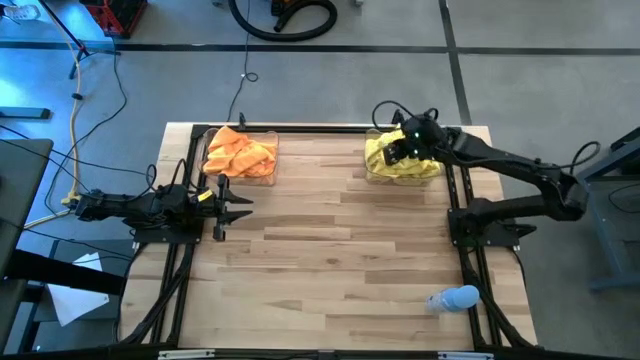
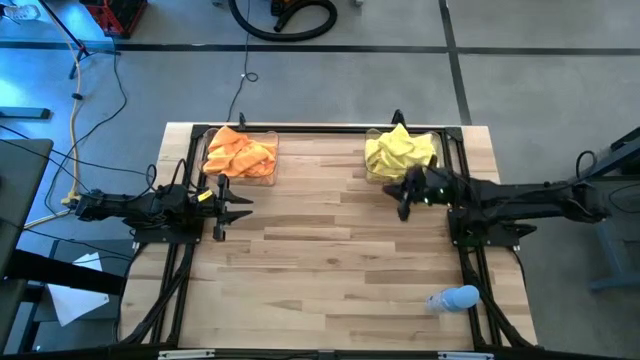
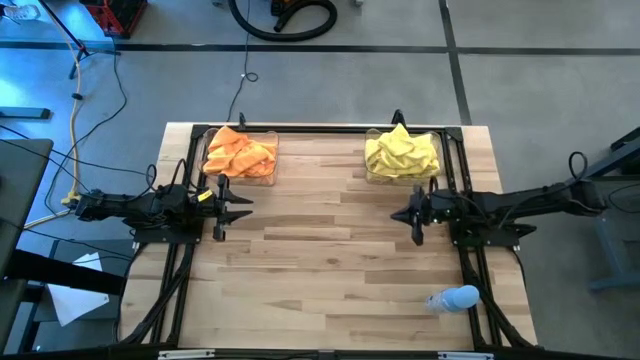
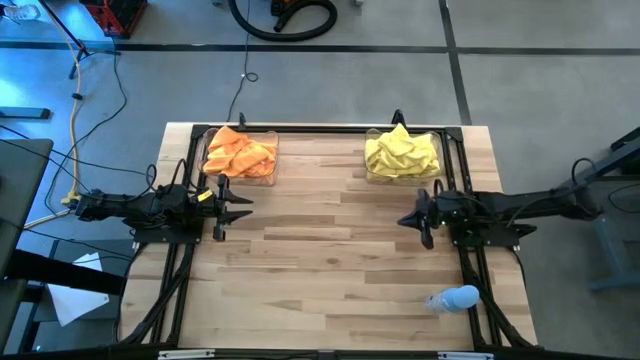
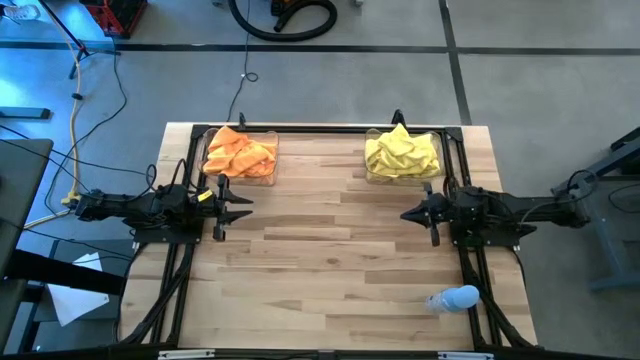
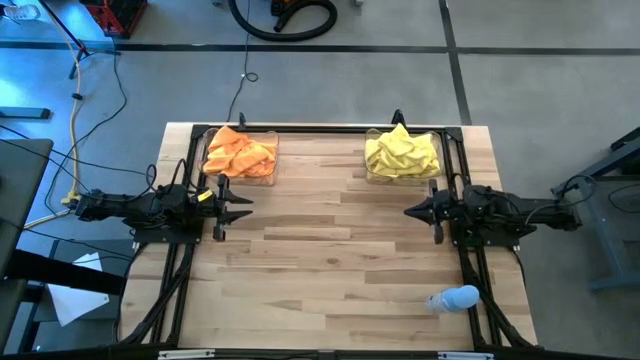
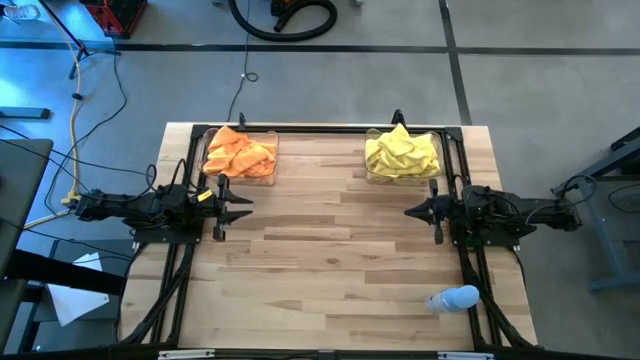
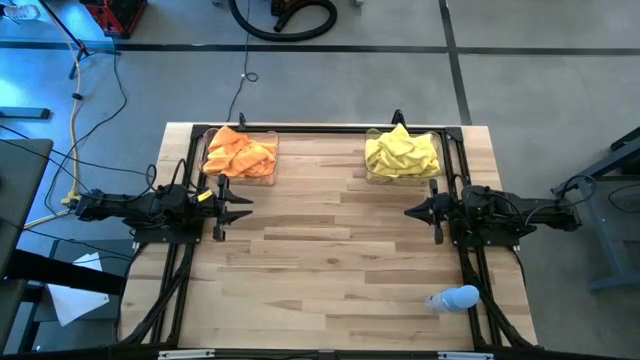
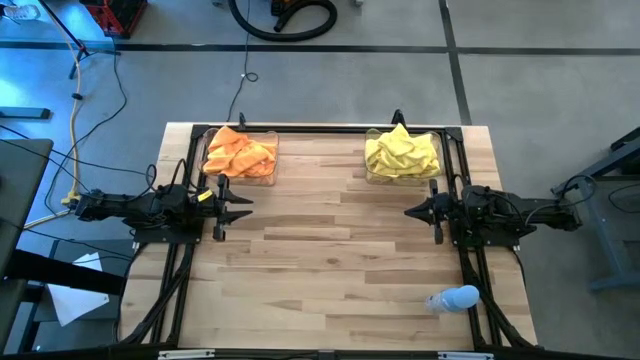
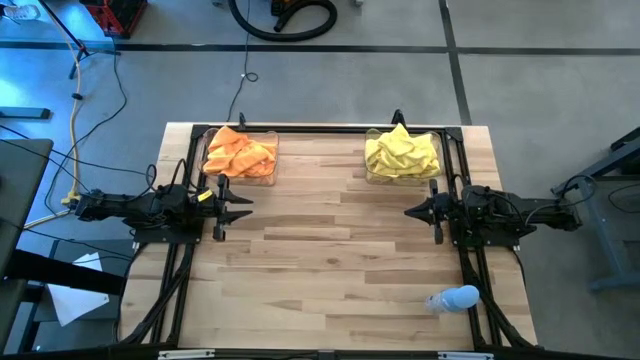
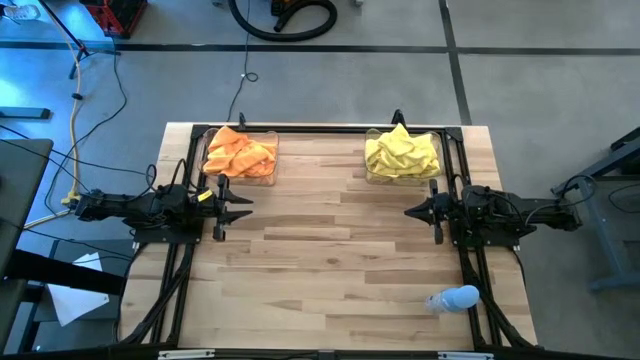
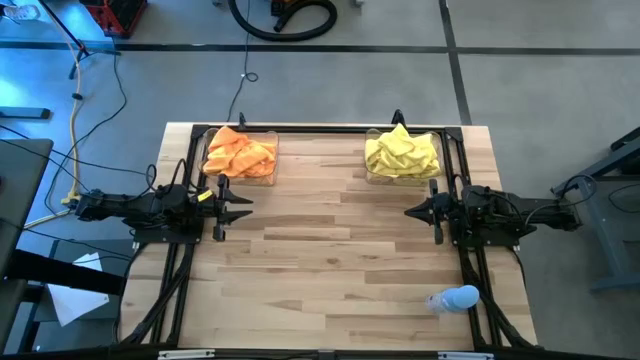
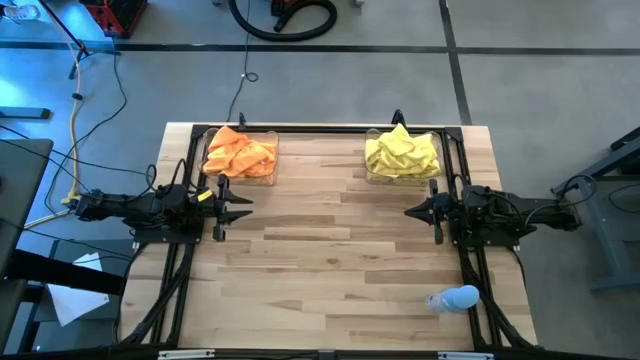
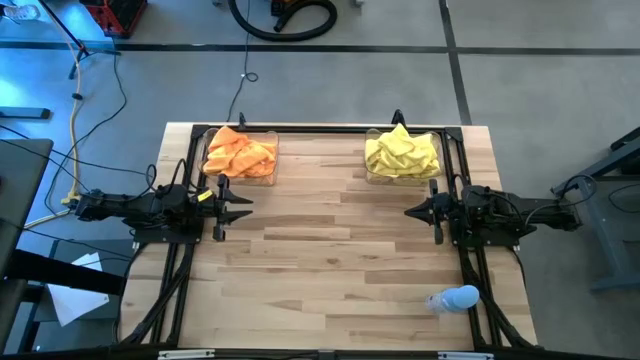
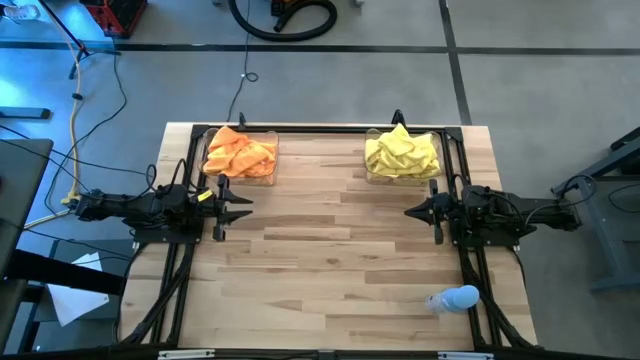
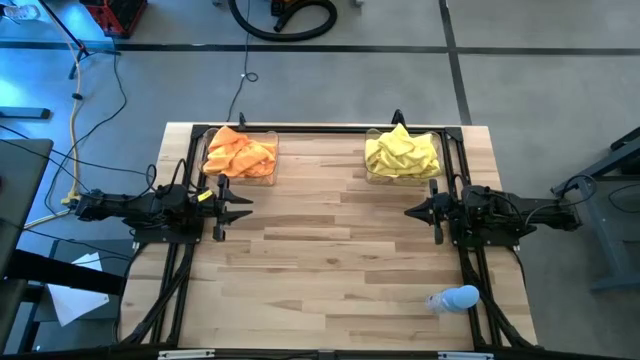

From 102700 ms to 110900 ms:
Task: Sort microfiber towel by color & place in baskets
Return to Home Position

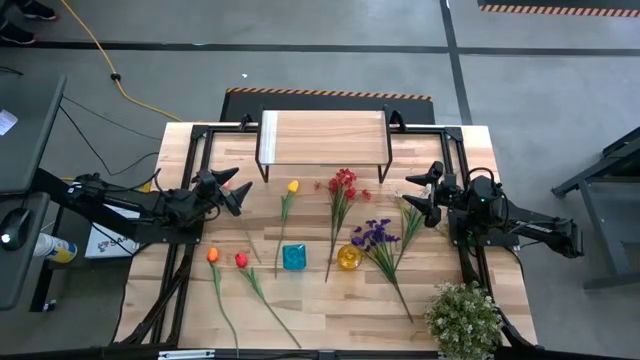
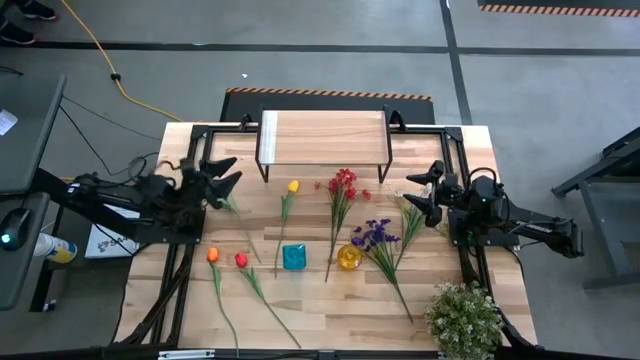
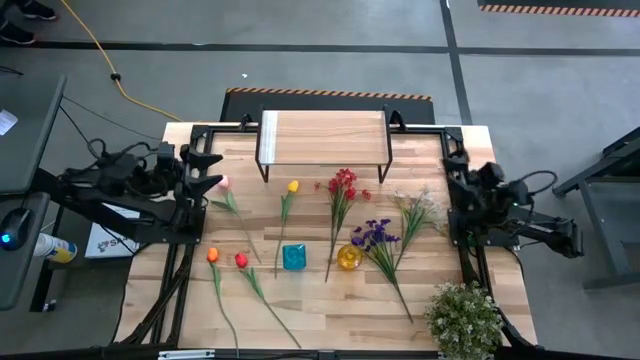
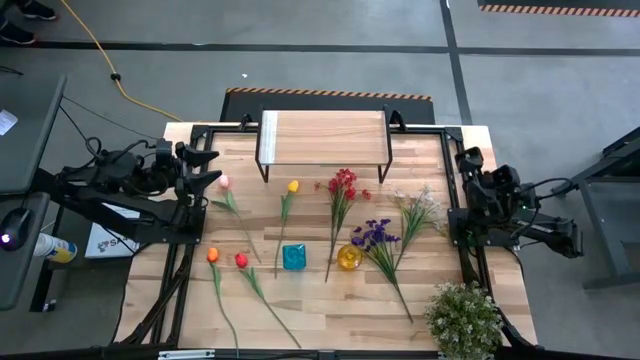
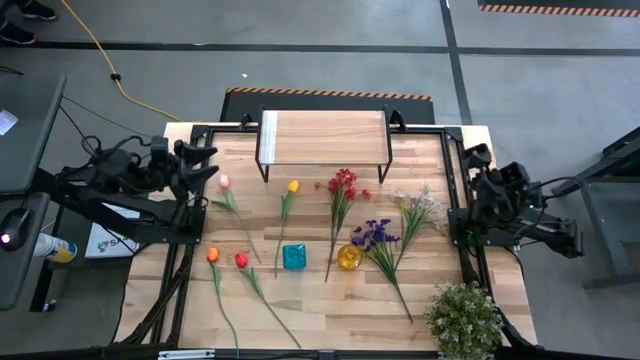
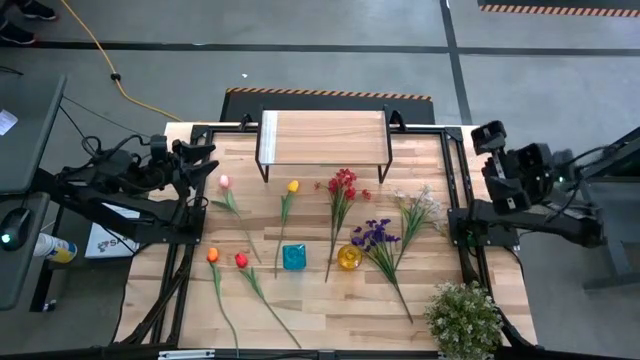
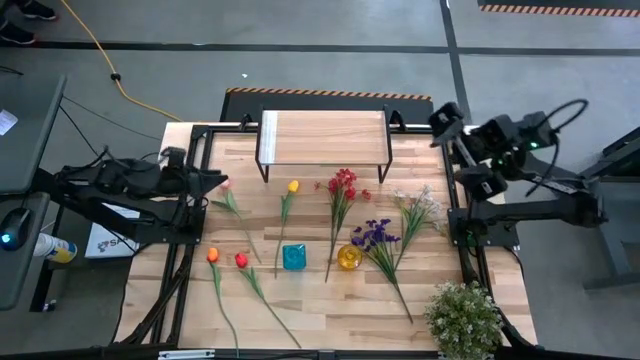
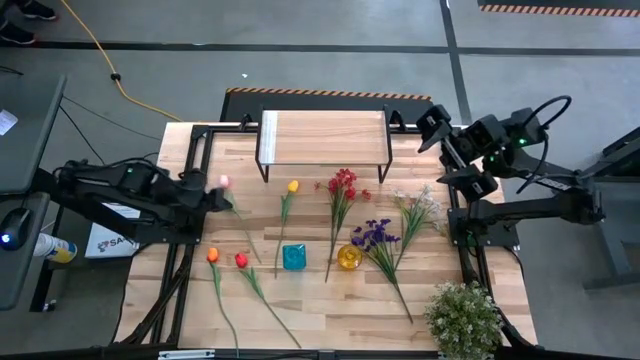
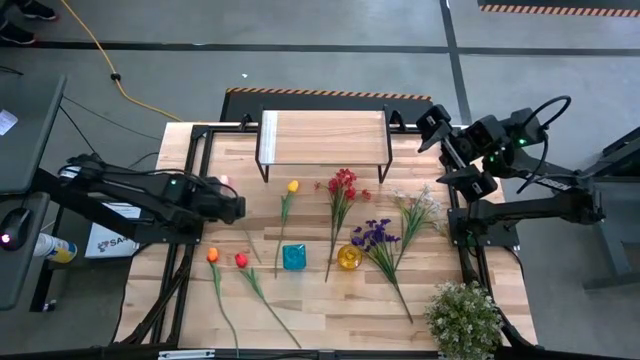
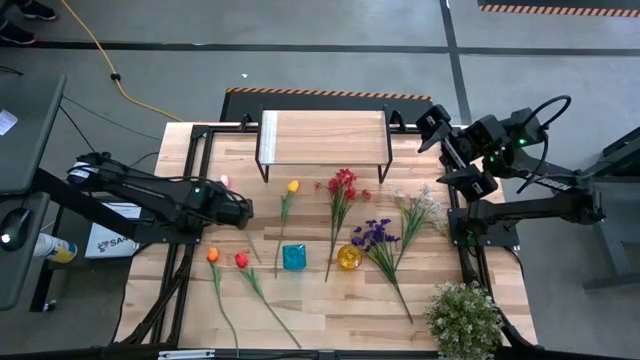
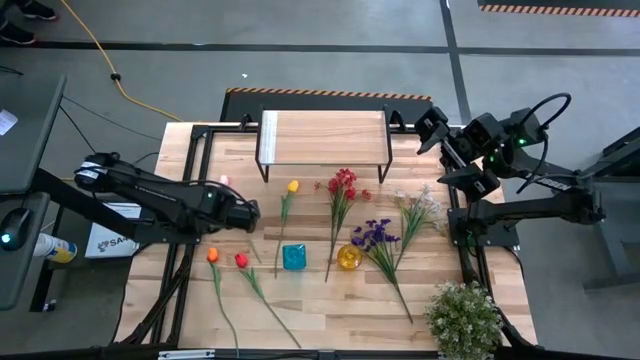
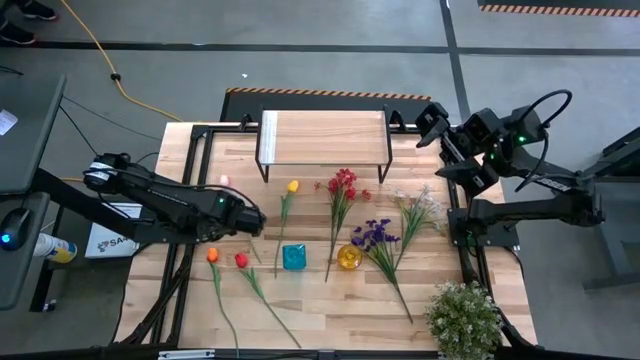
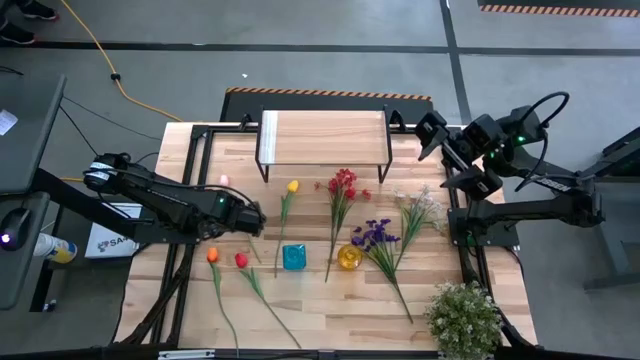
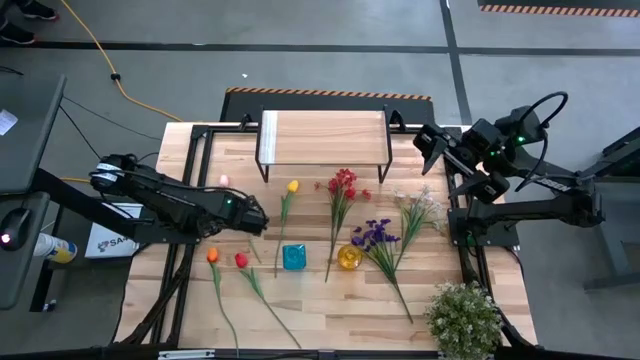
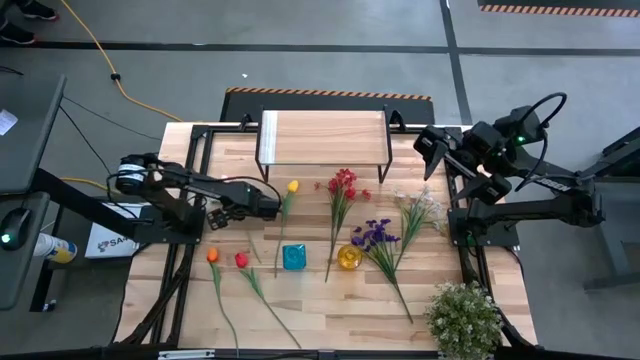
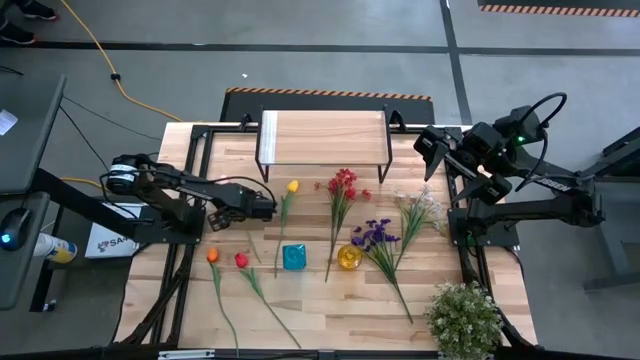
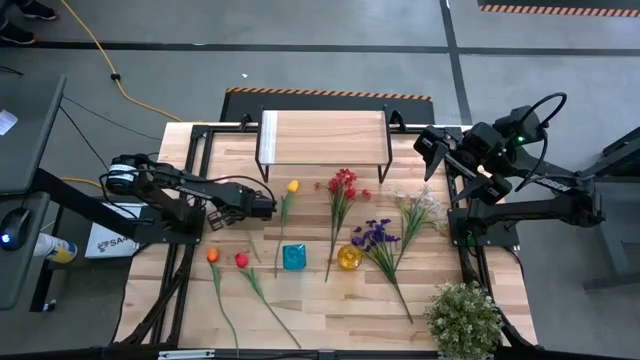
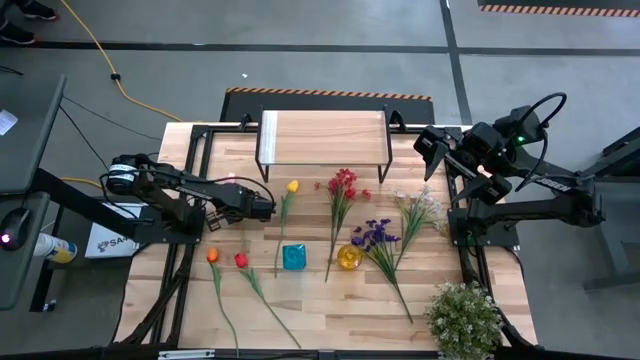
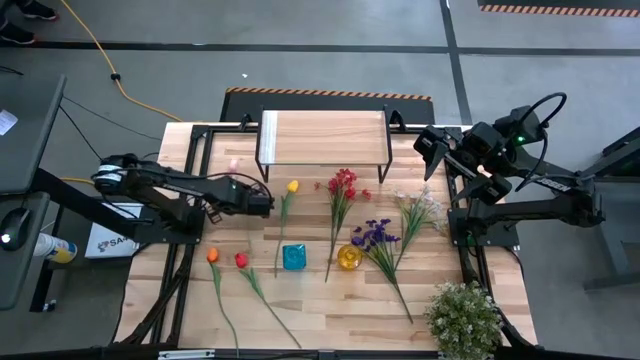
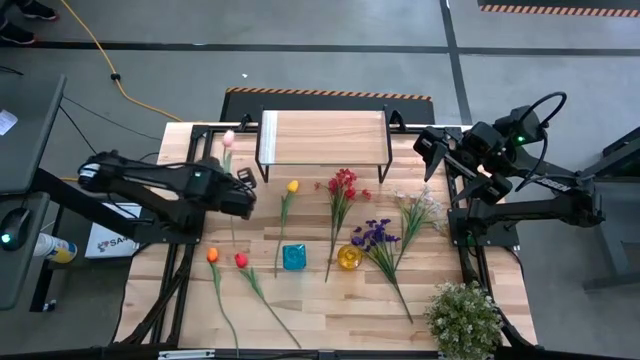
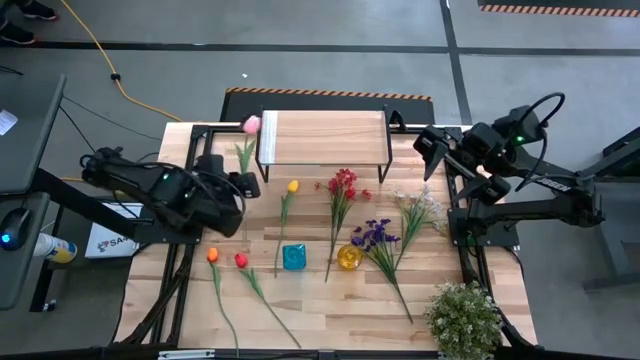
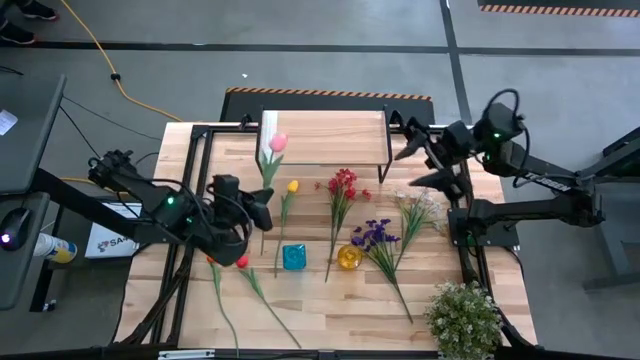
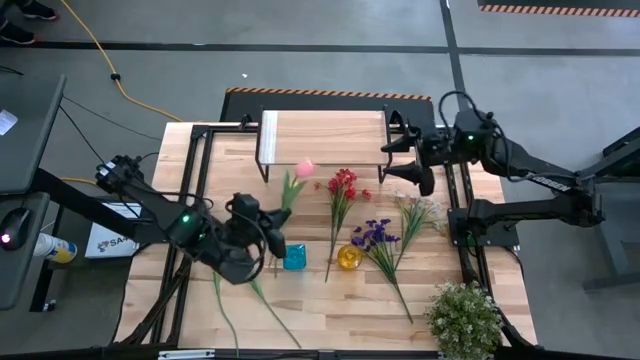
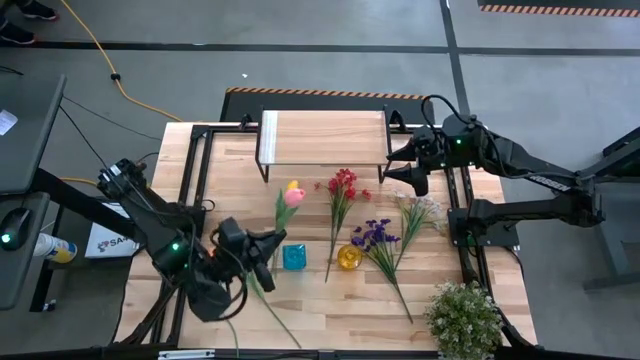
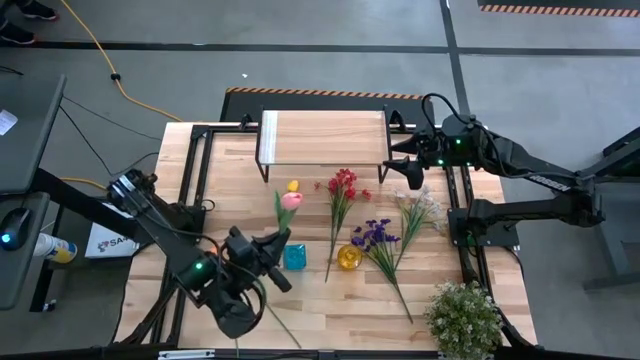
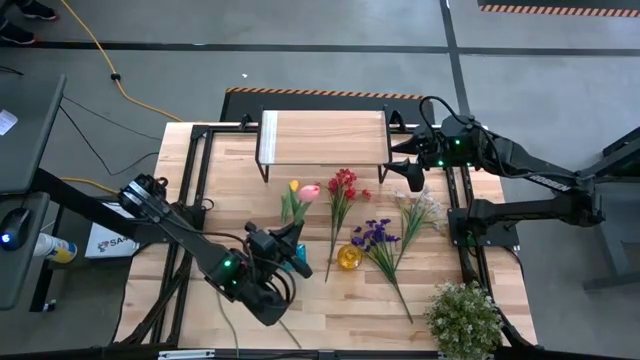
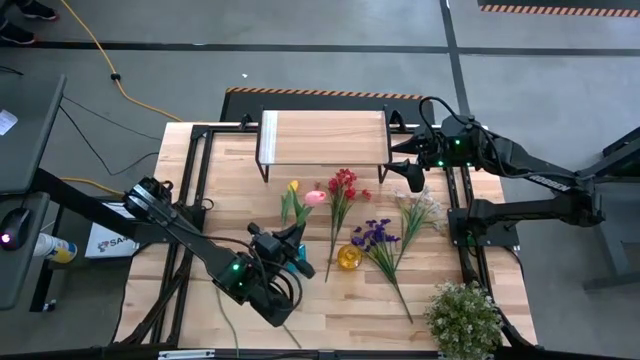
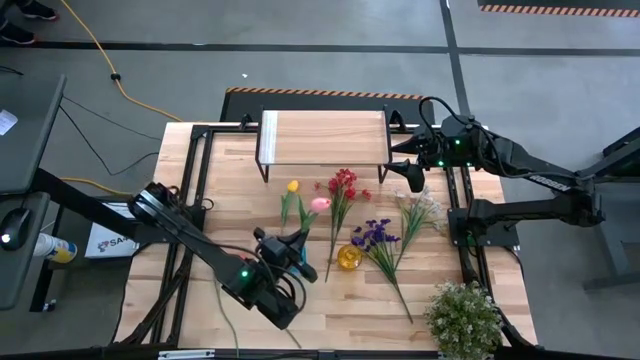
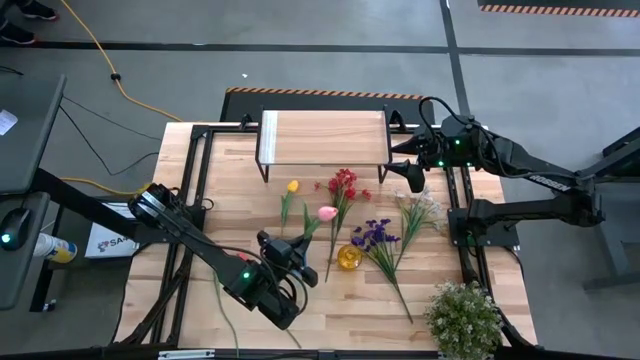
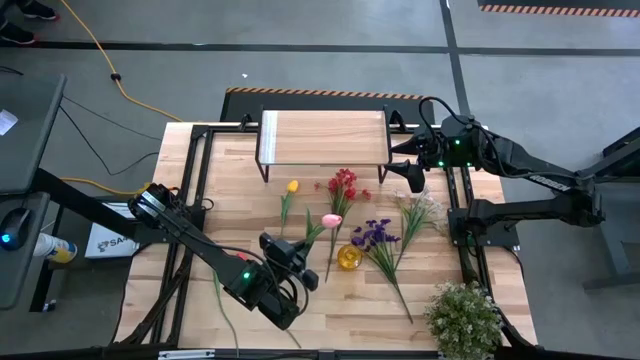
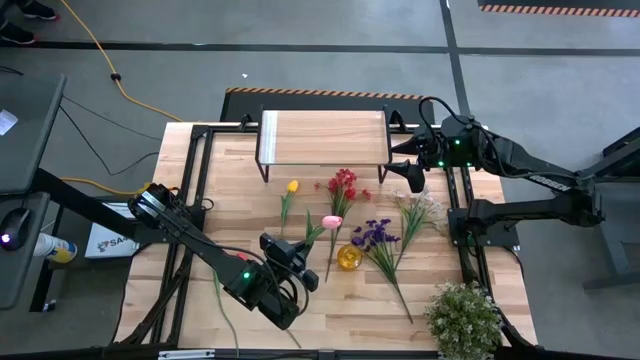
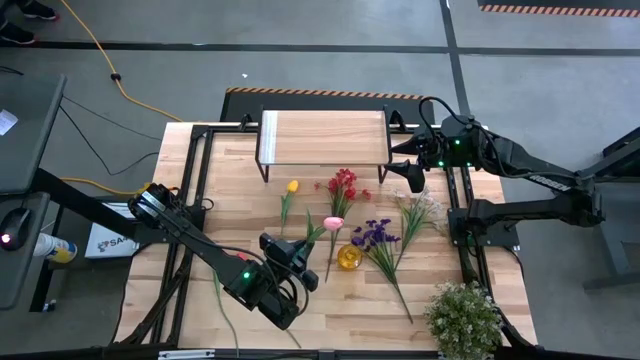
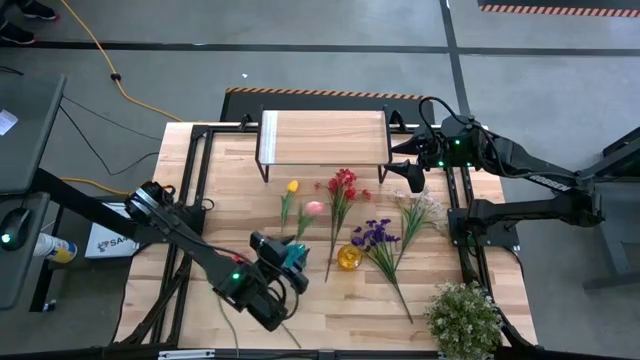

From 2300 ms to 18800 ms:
Task: Pick and place flowers into a vace then onto a shelf
Put the pink tulip into the blue vase
